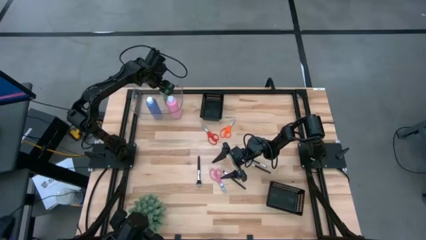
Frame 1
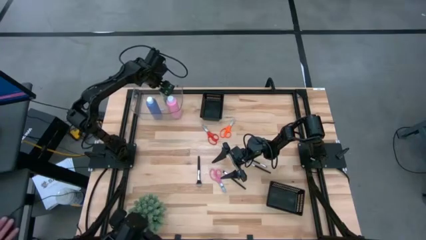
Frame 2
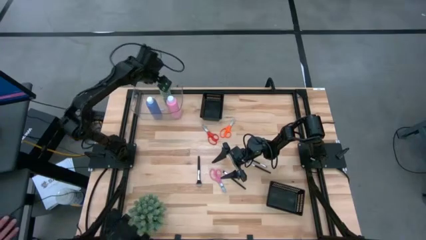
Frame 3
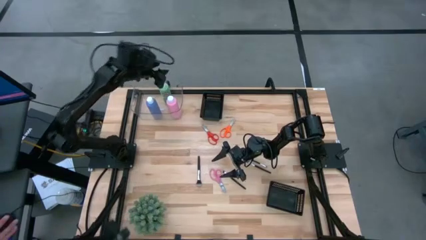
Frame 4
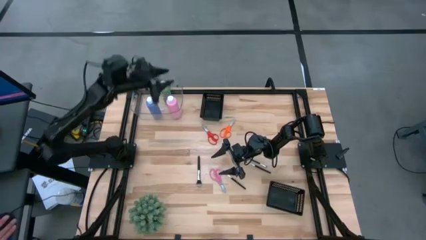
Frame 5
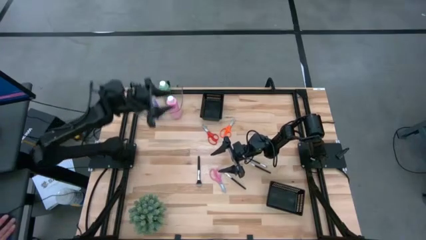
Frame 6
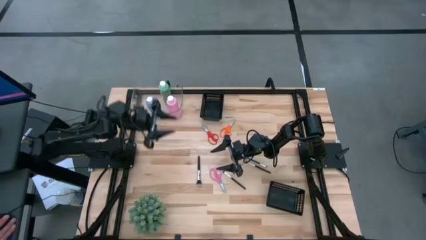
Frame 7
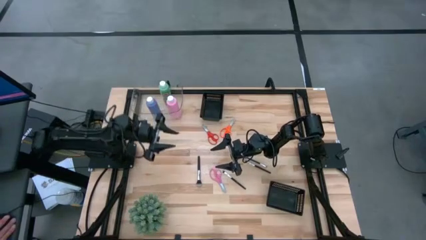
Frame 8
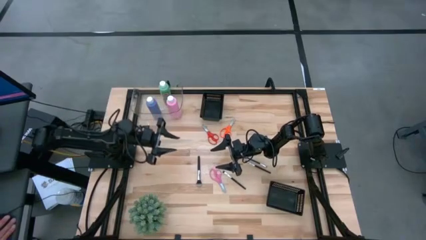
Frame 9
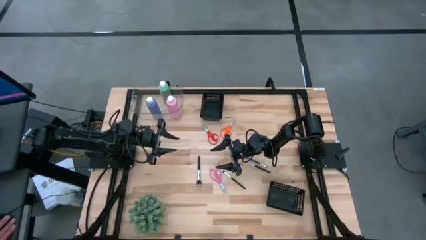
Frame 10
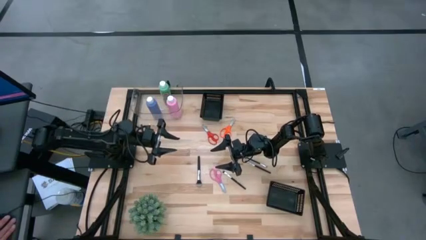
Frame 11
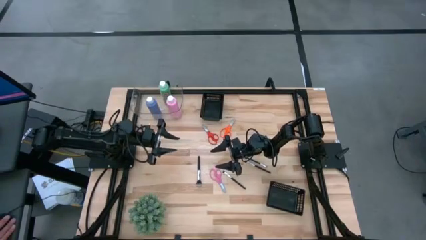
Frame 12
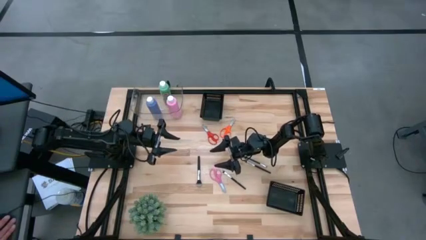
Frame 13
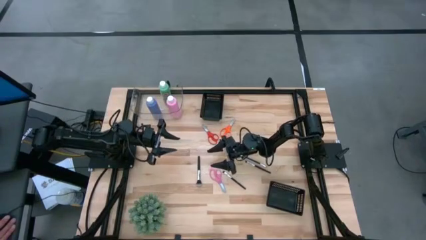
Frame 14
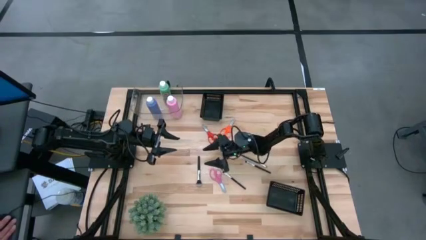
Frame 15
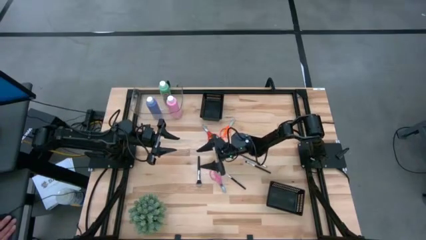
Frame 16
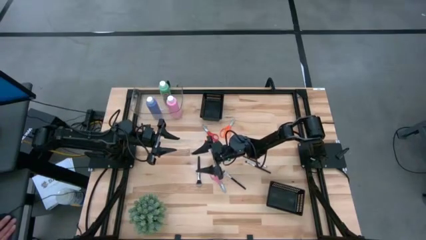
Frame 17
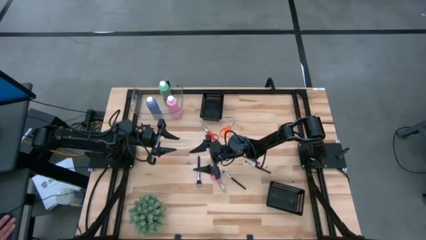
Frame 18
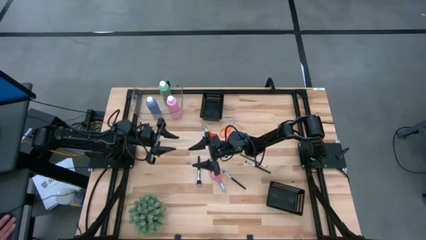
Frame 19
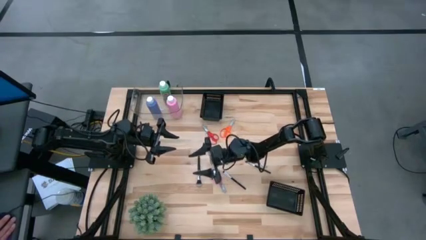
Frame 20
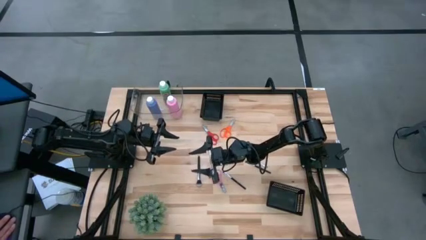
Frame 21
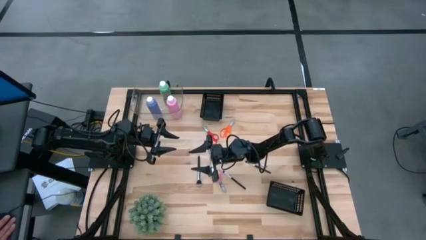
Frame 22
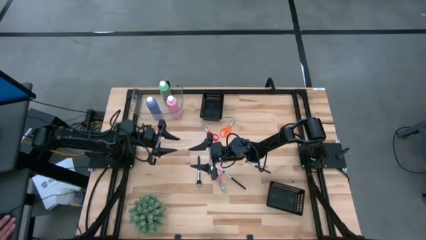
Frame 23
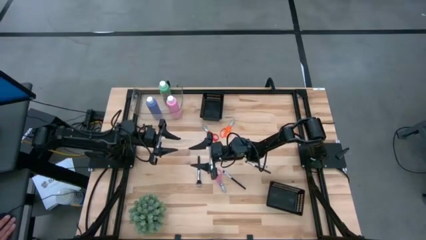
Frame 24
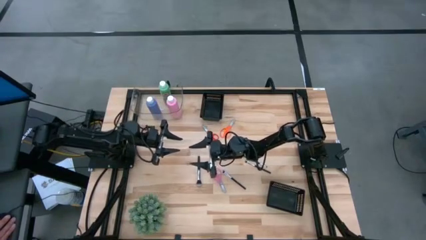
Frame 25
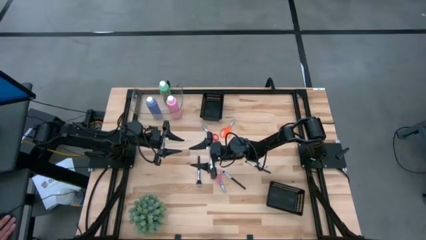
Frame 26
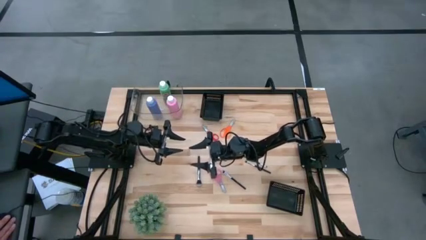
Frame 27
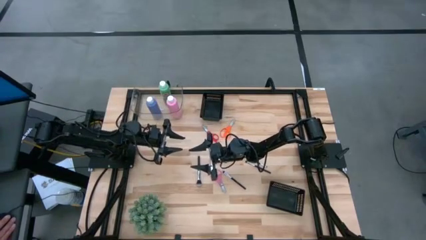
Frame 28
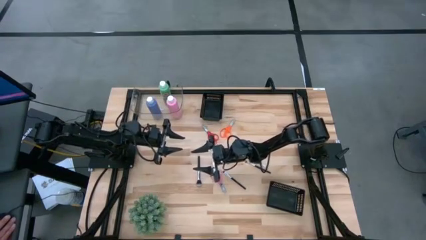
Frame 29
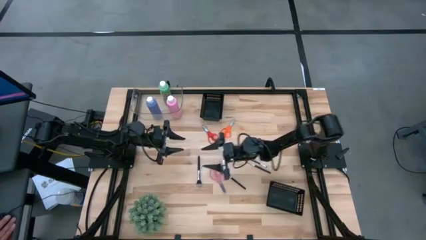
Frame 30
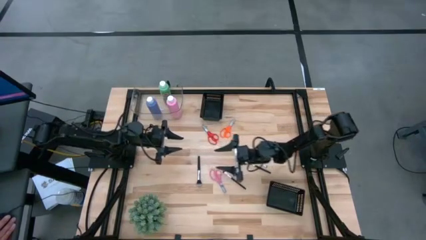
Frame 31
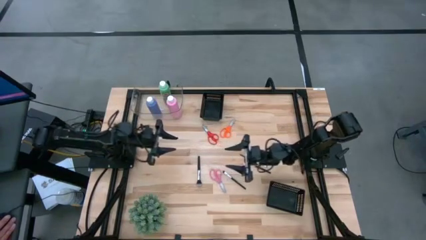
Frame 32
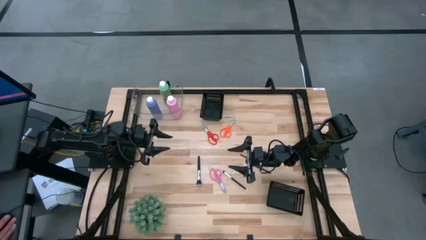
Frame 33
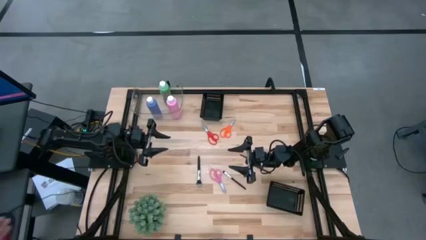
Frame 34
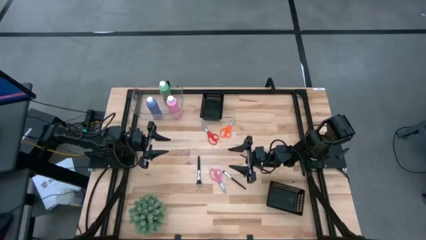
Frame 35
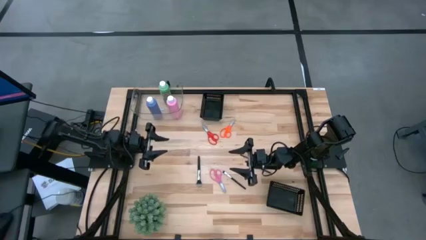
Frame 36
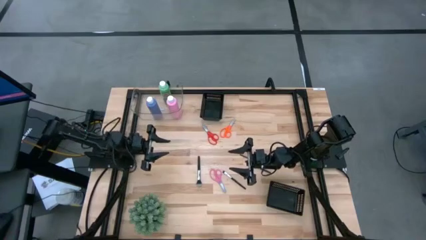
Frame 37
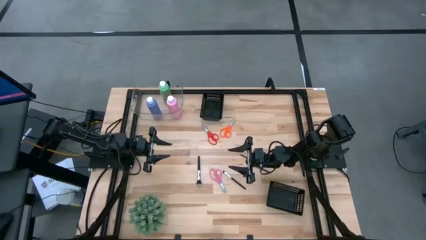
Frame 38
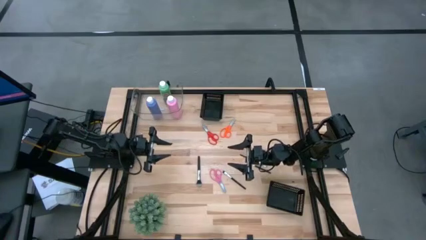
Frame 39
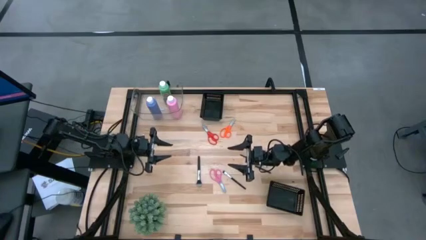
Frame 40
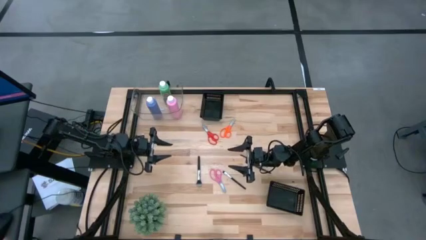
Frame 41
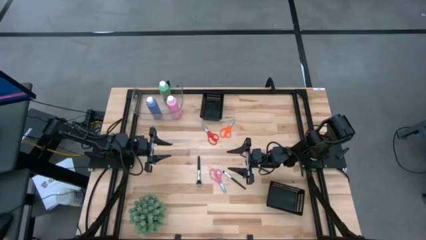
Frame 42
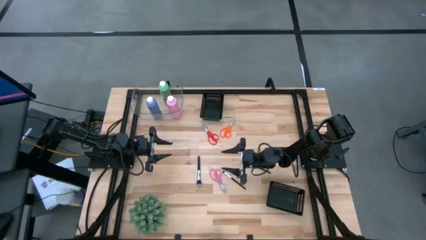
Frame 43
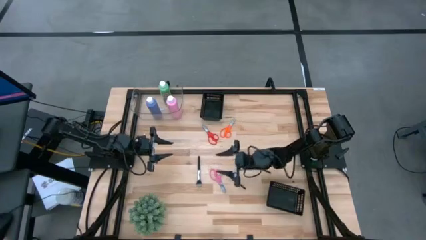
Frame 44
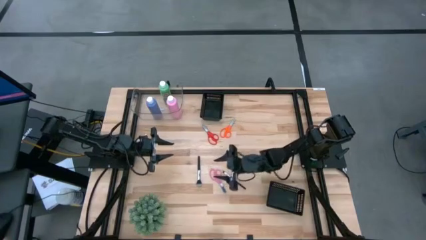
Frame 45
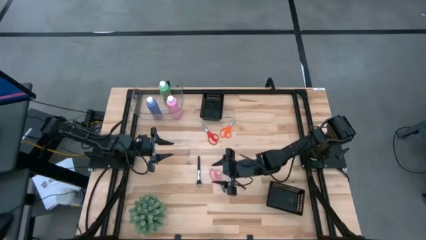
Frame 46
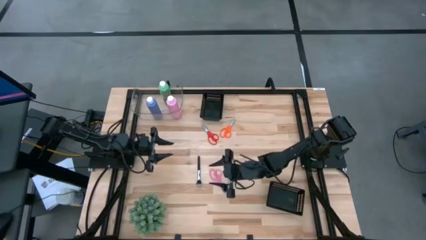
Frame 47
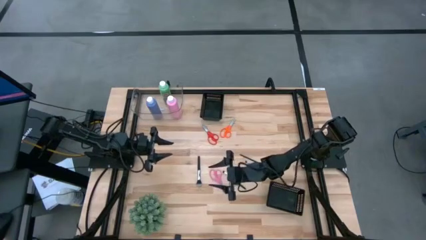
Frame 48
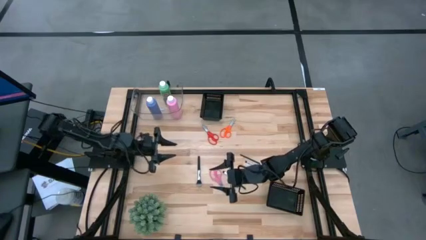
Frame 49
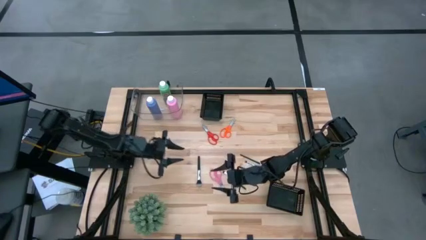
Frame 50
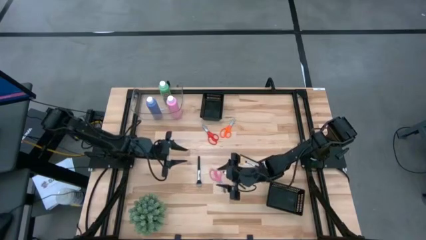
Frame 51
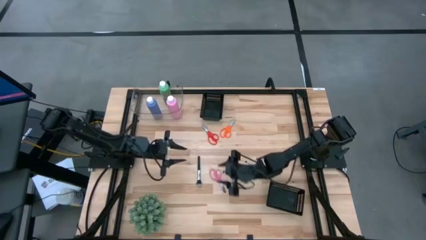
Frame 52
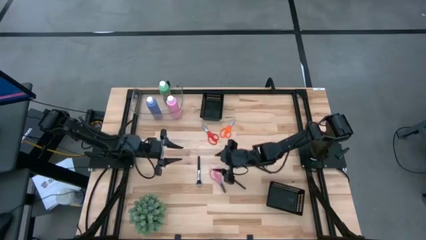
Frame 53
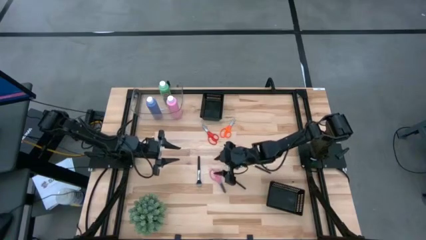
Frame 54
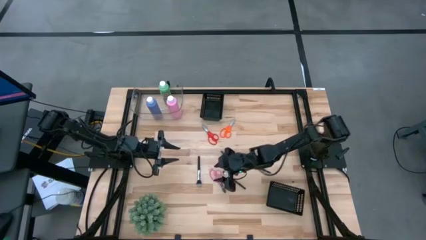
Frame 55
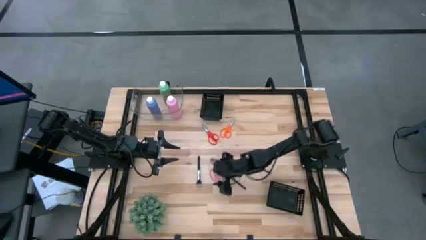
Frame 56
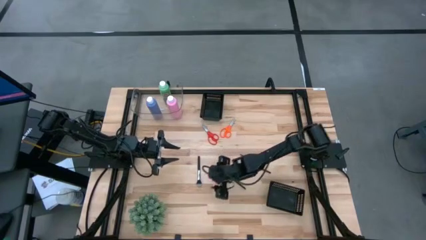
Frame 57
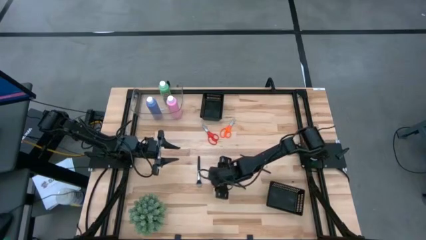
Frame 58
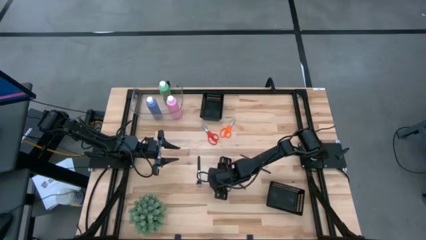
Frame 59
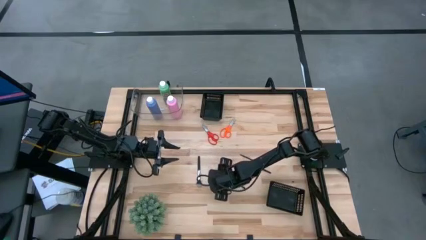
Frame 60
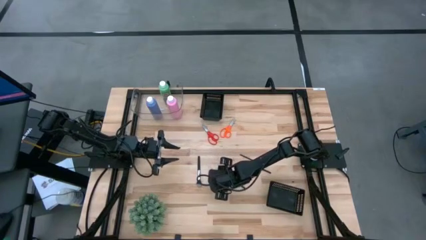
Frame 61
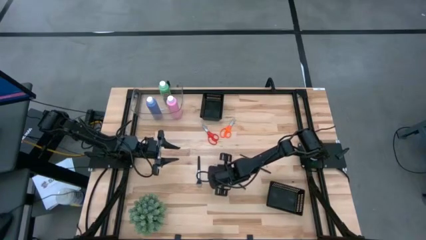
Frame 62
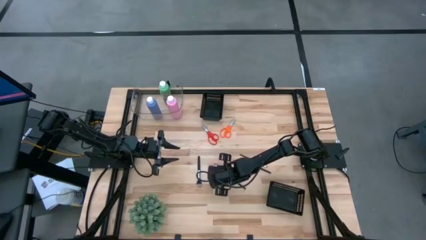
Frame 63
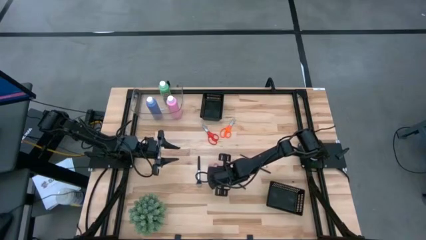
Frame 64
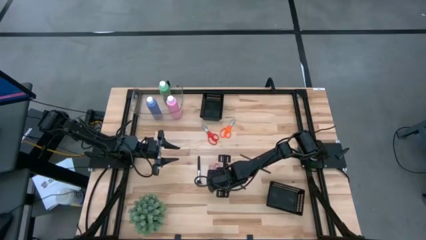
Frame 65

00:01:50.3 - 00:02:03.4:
Task: Pick & Place Paint Supplies
Put the pink scissors into the top black bin

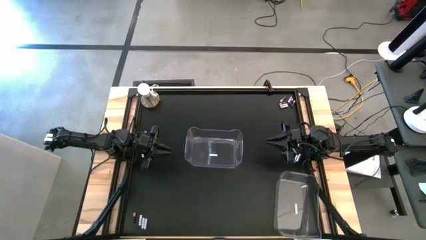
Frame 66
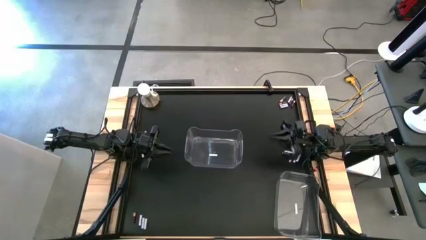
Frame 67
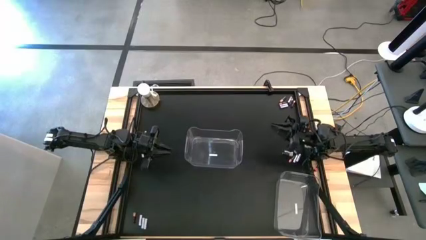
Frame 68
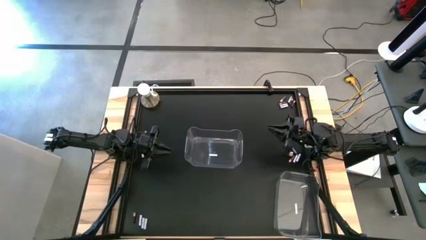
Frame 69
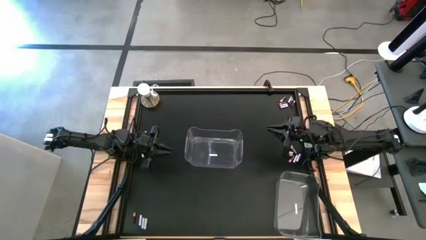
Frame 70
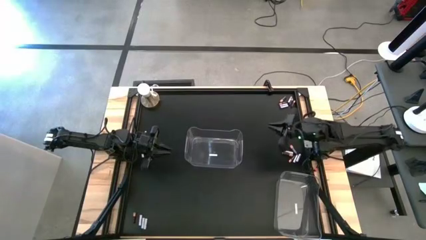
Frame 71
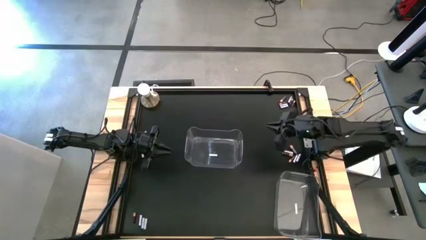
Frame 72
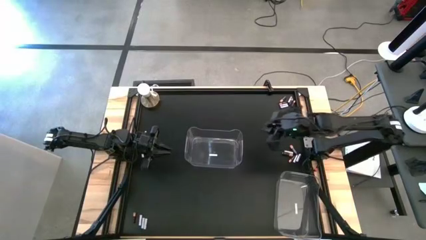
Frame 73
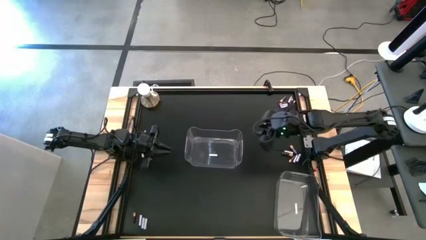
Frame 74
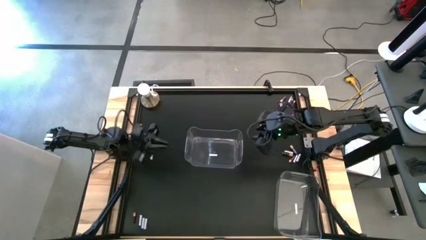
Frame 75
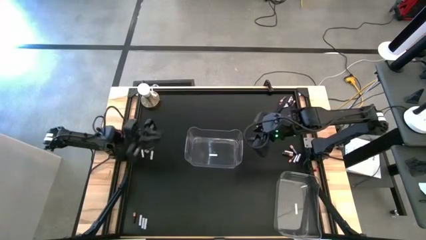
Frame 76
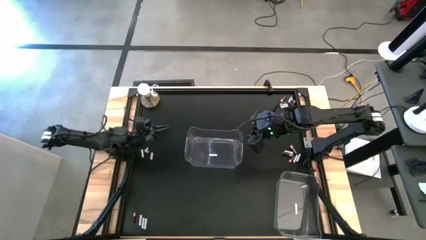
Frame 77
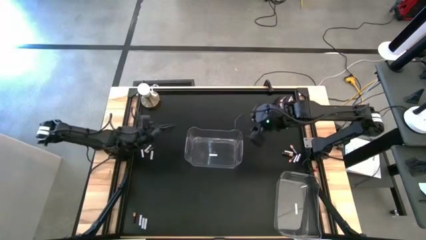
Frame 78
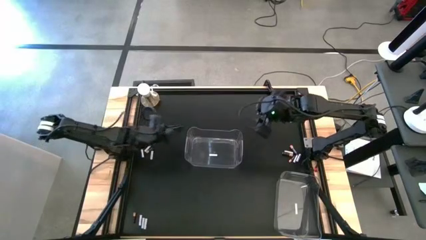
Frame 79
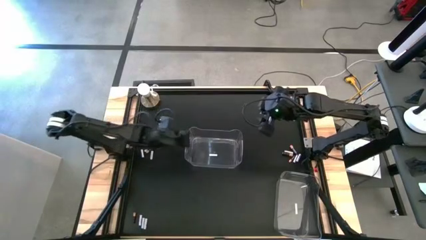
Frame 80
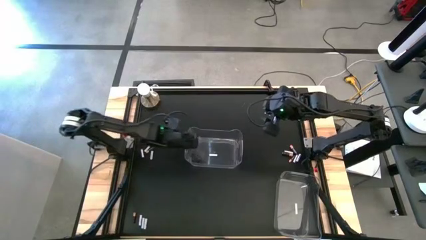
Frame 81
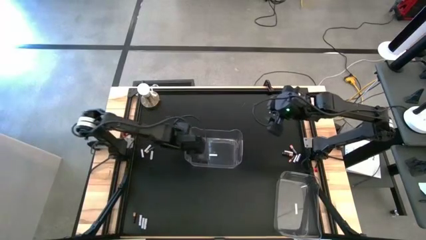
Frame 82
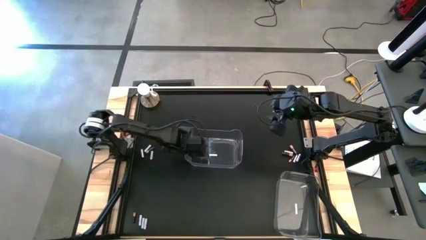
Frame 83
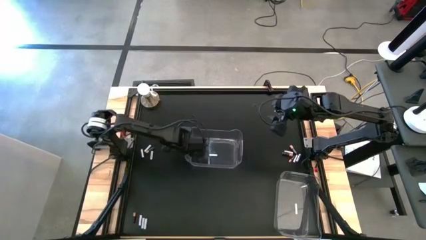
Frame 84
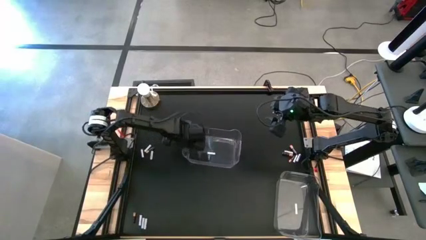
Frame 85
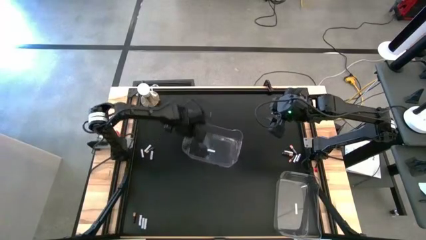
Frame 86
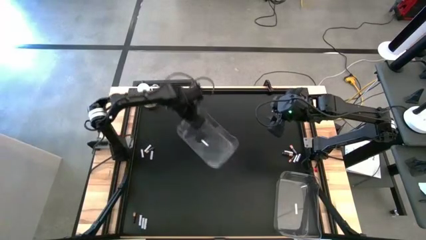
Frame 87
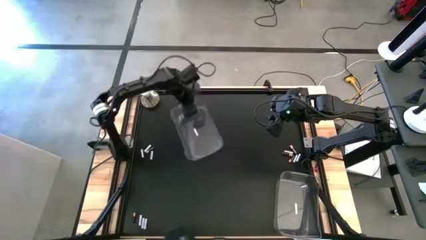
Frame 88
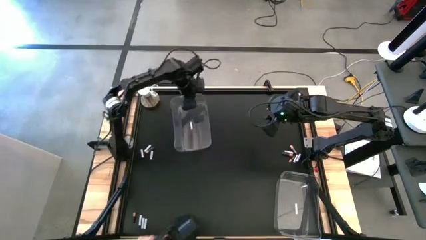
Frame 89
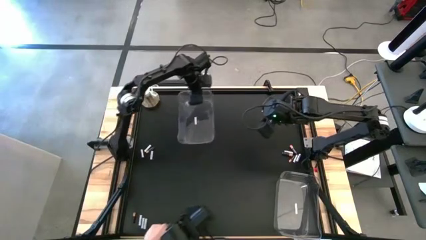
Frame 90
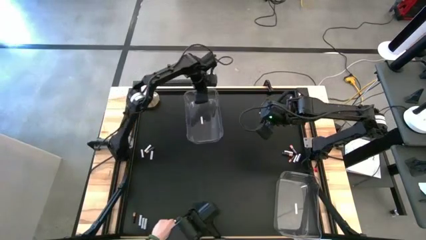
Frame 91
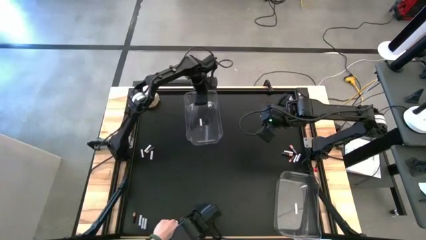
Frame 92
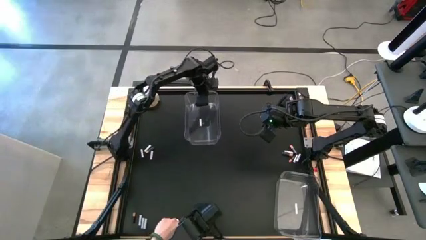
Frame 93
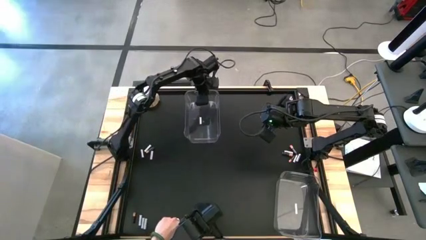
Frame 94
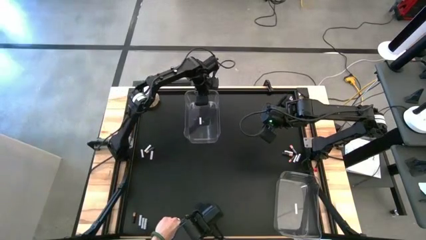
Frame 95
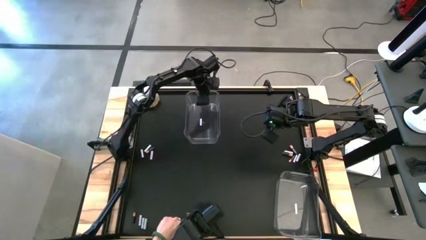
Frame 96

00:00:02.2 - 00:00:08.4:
Task: Sort batteries
Move the top transparent bin to the top of the table
